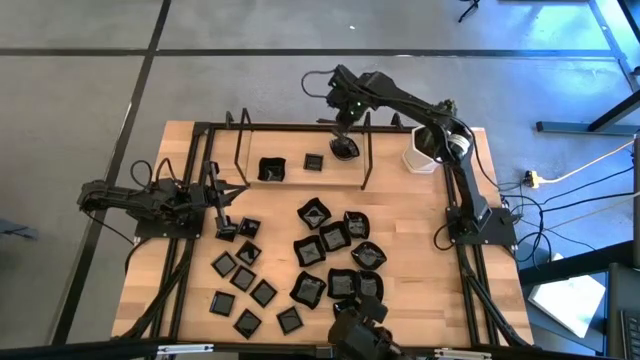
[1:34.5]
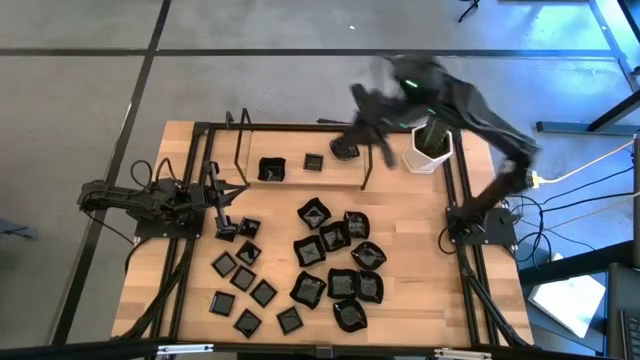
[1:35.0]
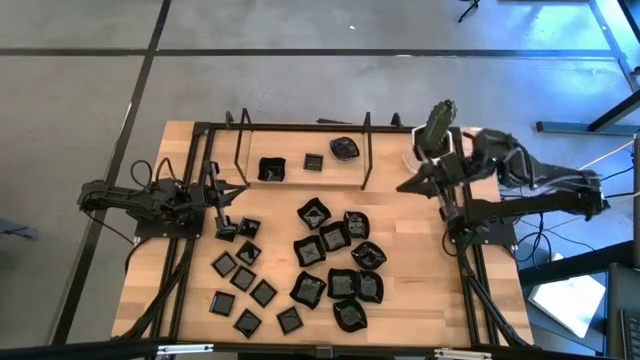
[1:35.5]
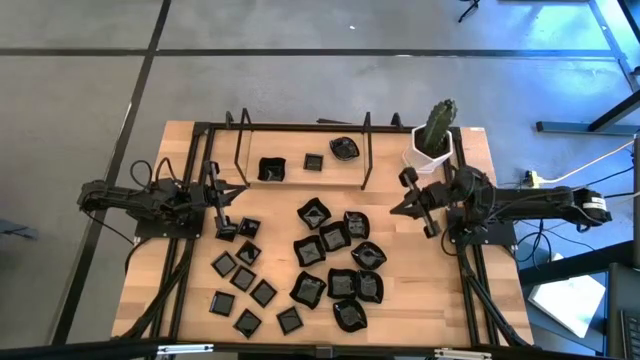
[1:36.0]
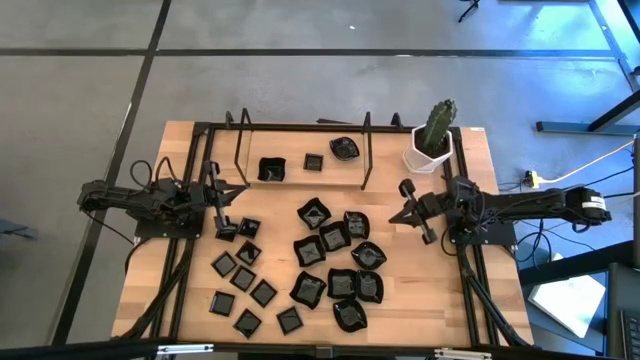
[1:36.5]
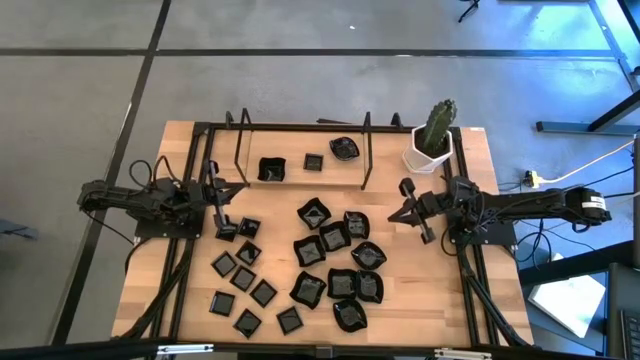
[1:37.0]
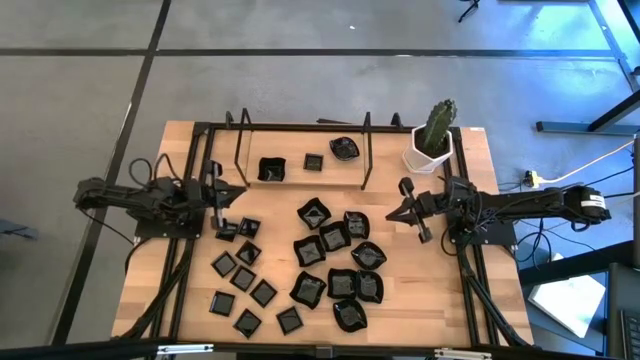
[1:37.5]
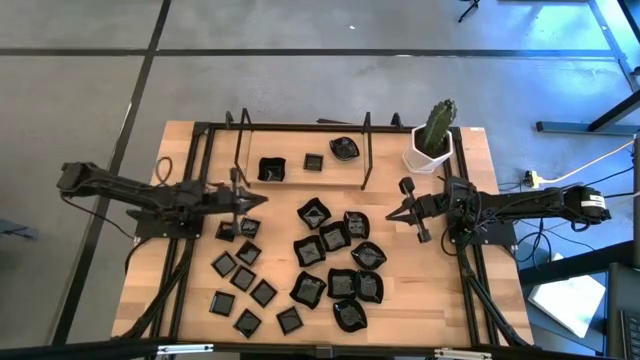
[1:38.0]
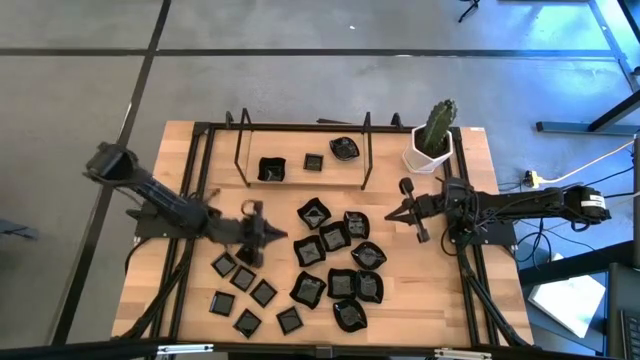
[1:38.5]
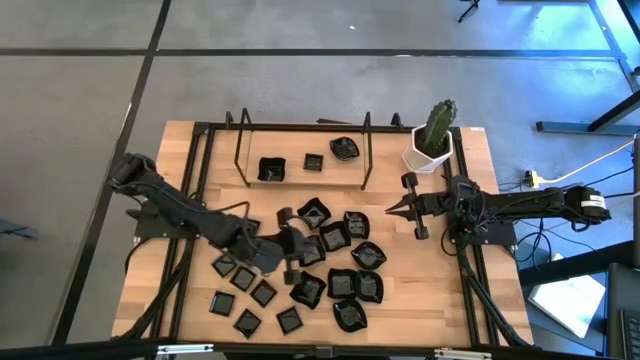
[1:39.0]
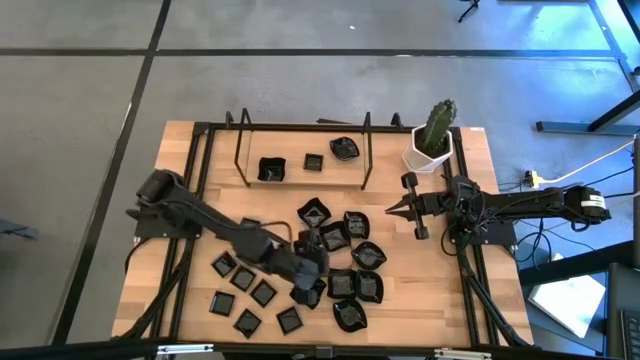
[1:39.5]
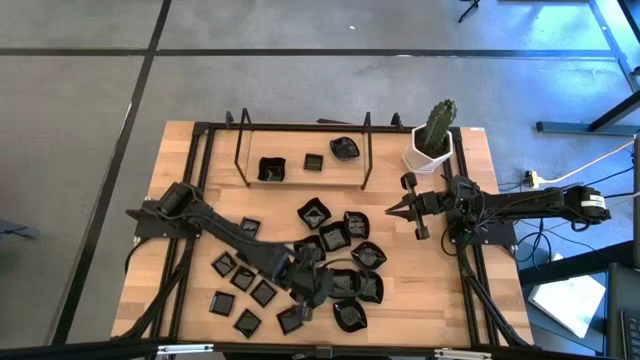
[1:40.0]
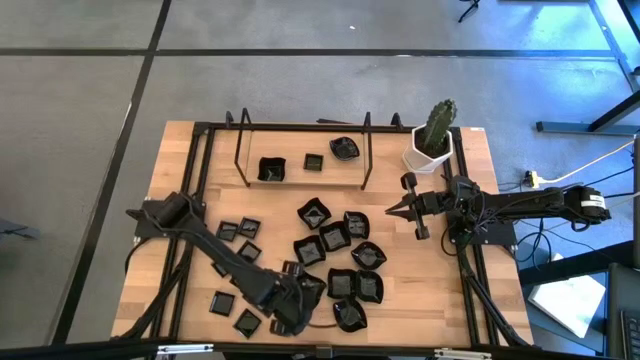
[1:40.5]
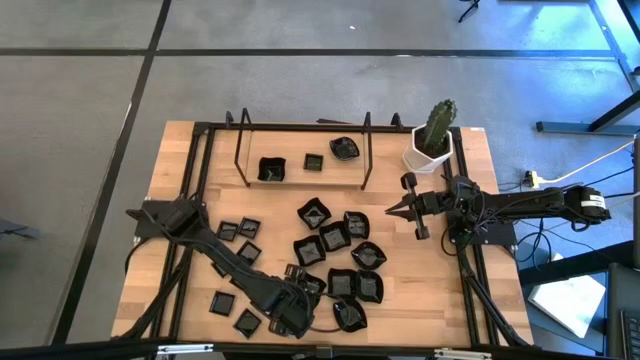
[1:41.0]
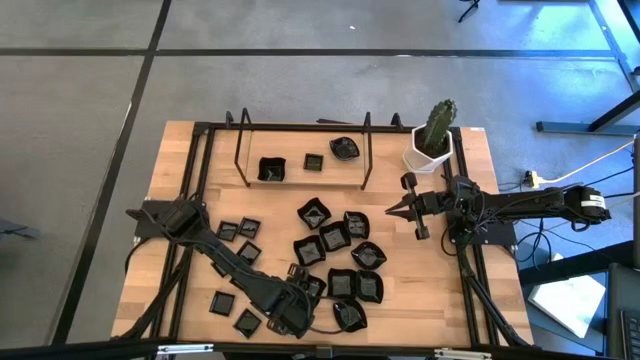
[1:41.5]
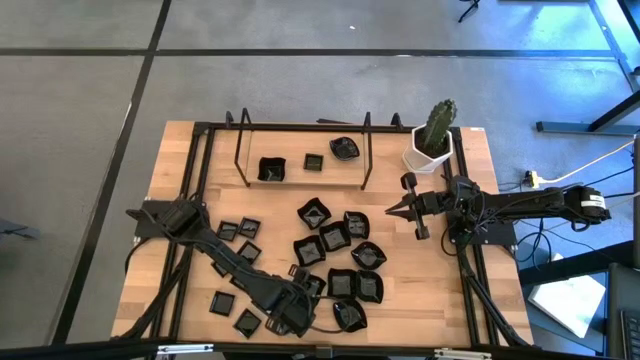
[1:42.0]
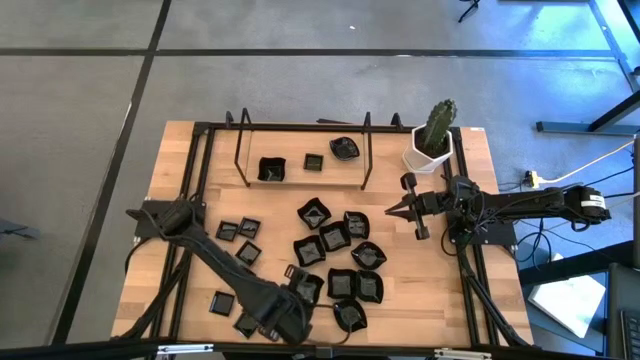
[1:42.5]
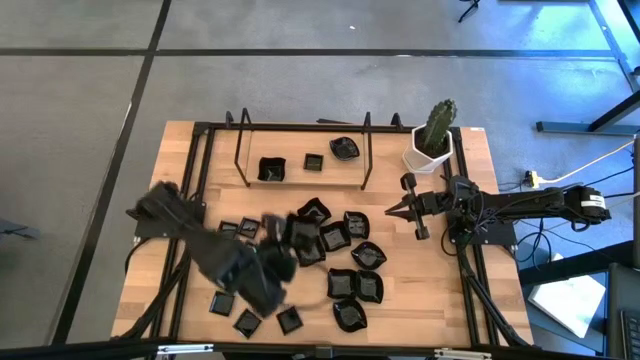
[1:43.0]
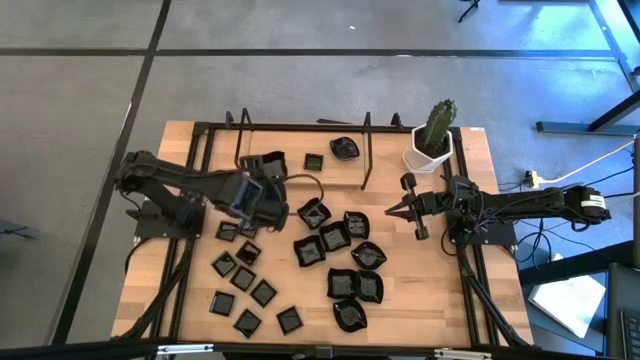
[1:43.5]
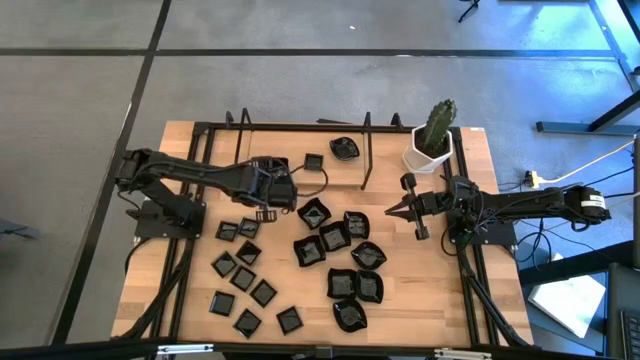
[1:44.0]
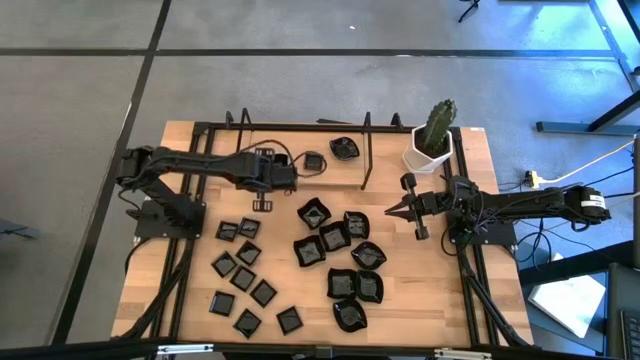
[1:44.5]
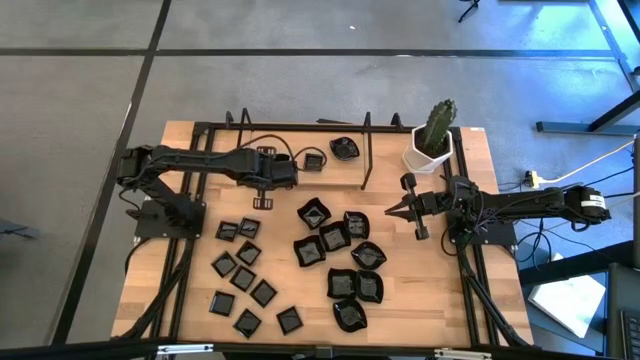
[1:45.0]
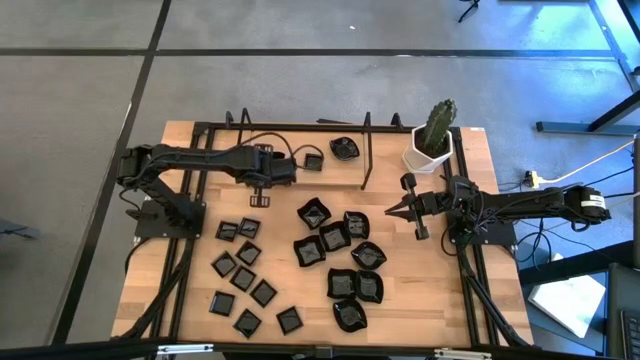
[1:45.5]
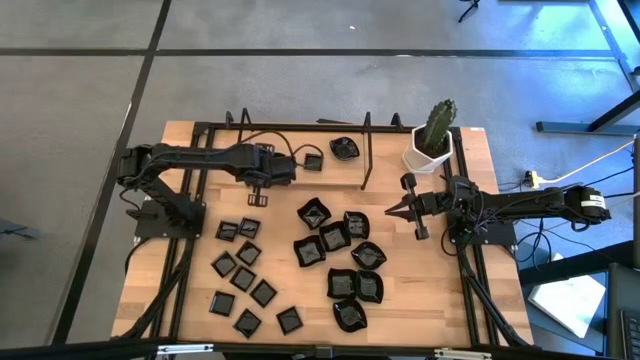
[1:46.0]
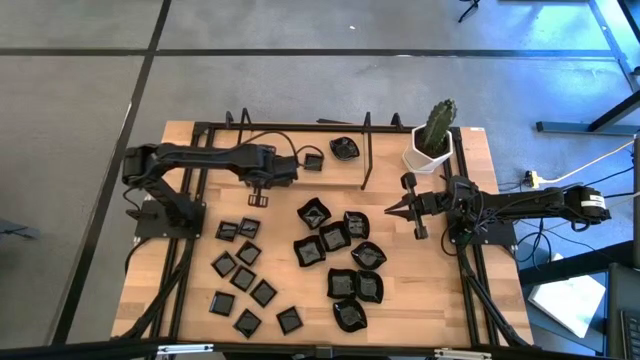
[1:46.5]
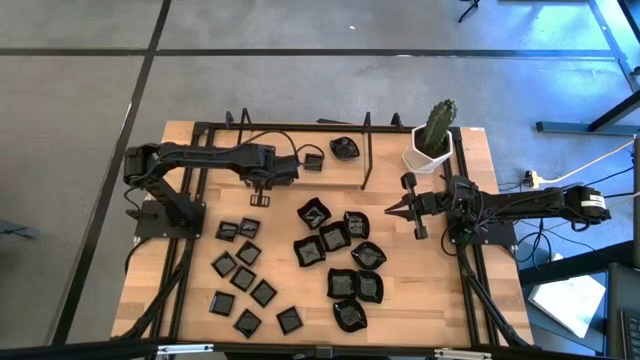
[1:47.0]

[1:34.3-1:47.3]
Task: Pick & Place Mini shaped plates
Stack the distorted square plate on top of the distorted square plate on the shelf

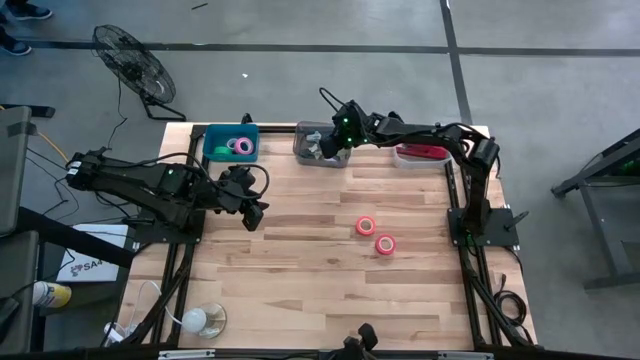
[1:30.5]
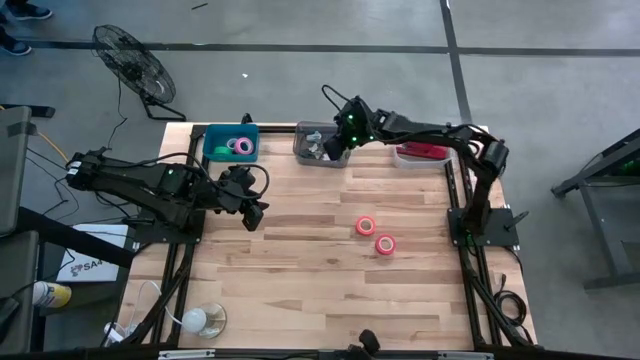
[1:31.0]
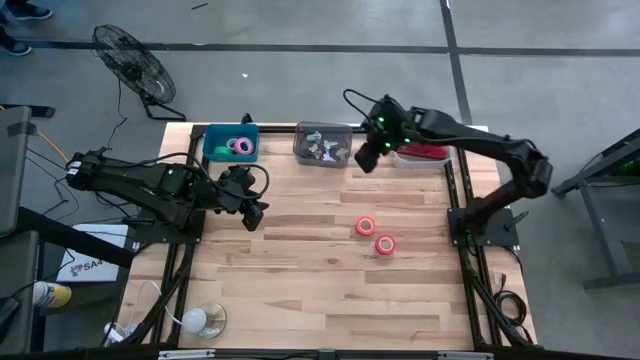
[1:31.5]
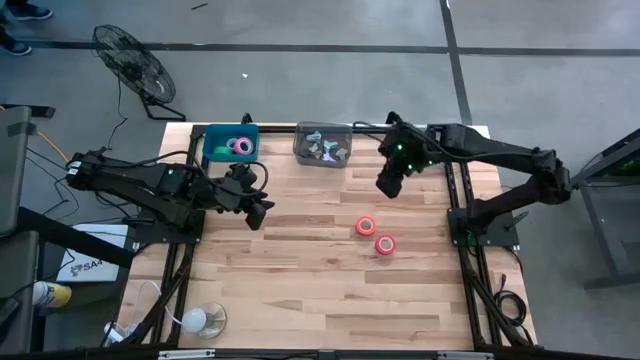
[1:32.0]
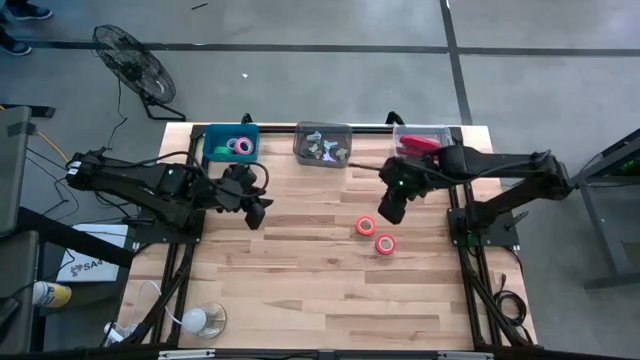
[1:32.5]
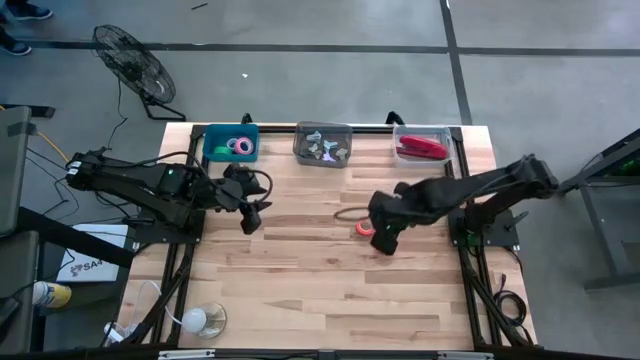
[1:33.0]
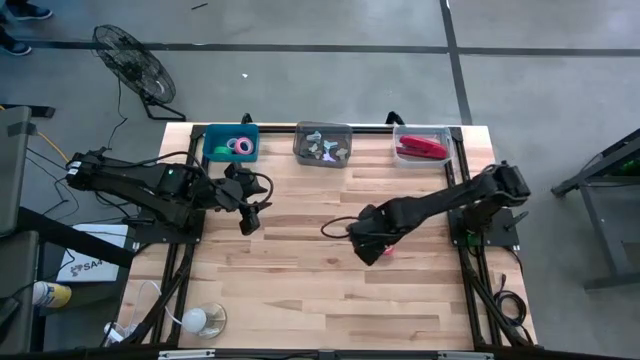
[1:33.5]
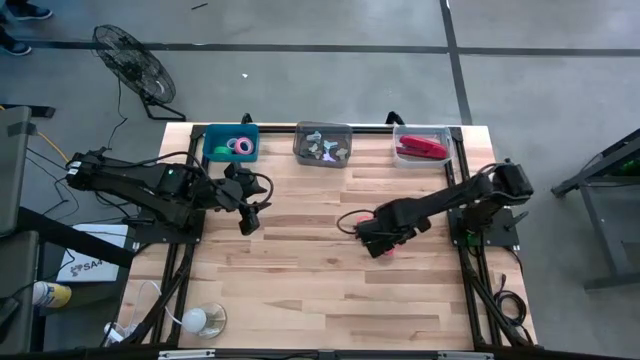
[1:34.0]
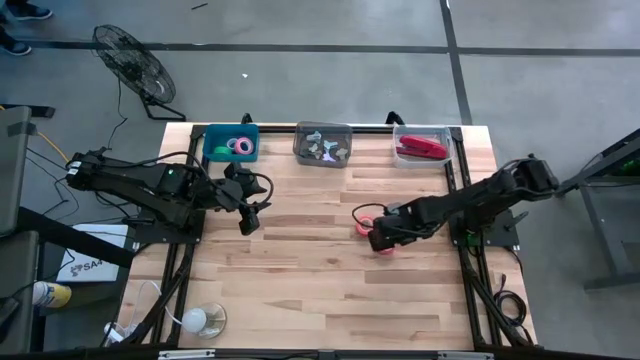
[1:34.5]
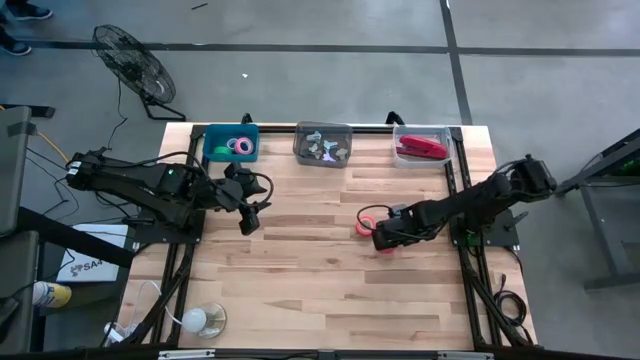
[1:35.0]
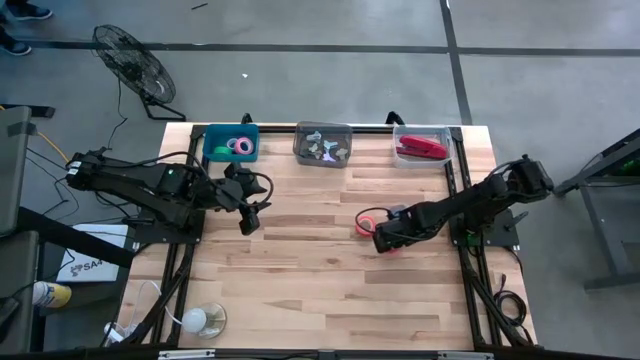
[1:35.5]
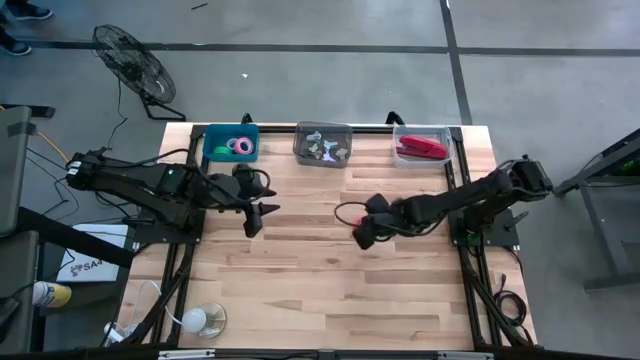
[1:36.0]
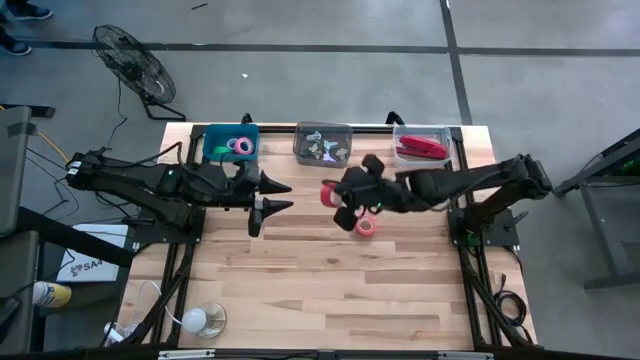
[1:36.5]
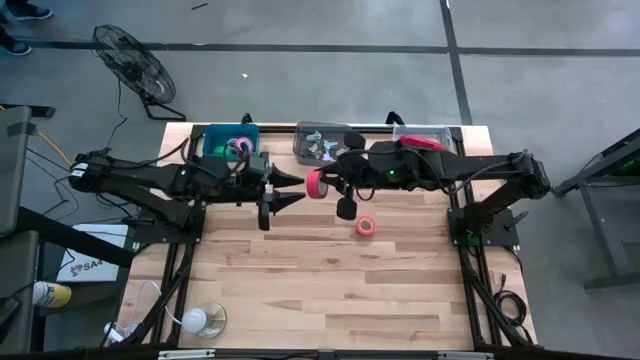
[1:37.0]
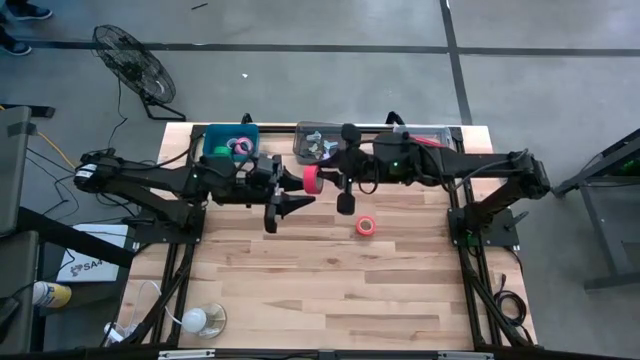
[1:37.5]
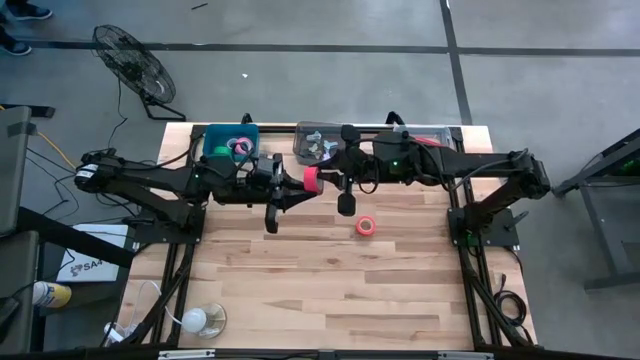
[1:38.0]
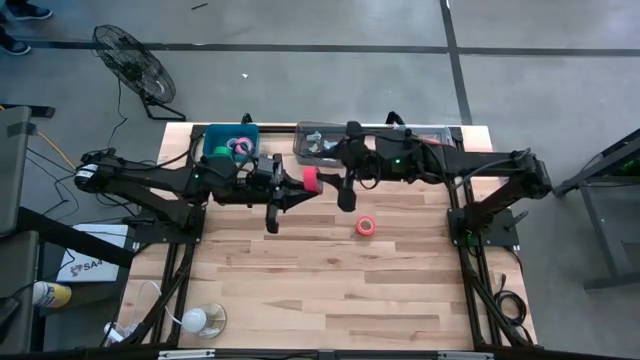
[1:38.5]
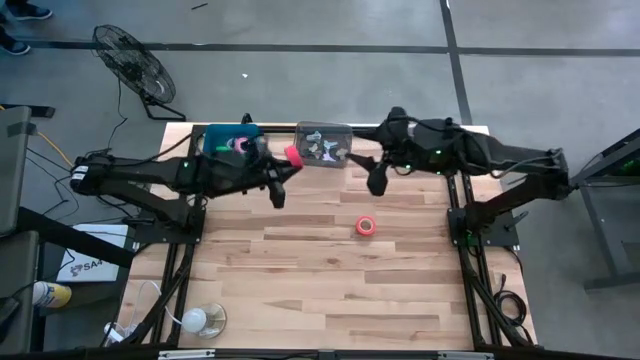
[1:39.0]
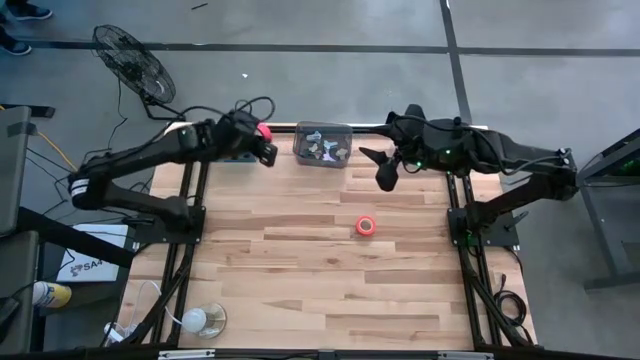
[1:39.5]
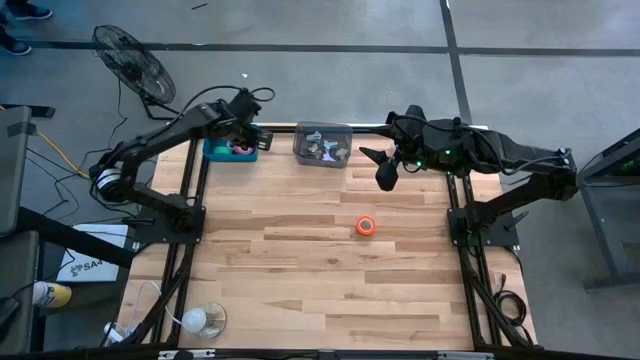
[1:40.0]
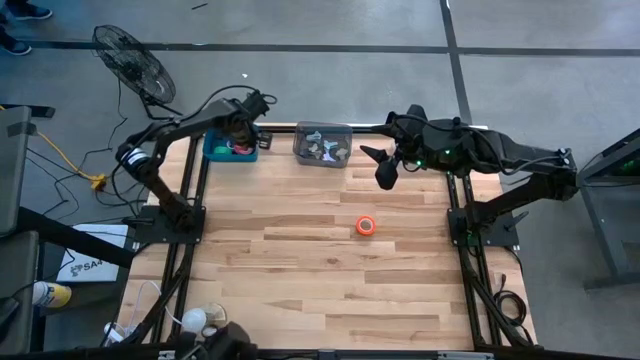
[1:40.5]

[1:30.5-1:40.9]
Task: Pick and place Stapler, Stapler remover, tape
Put the red tape into the blue bin
